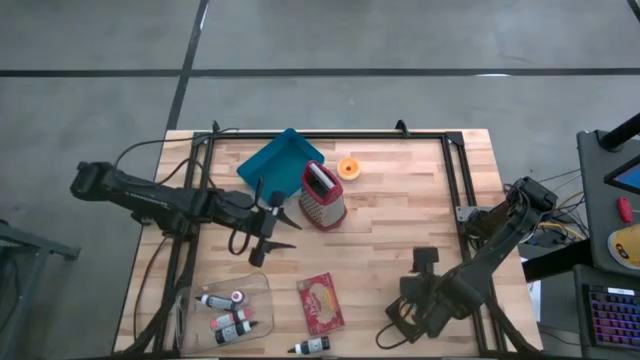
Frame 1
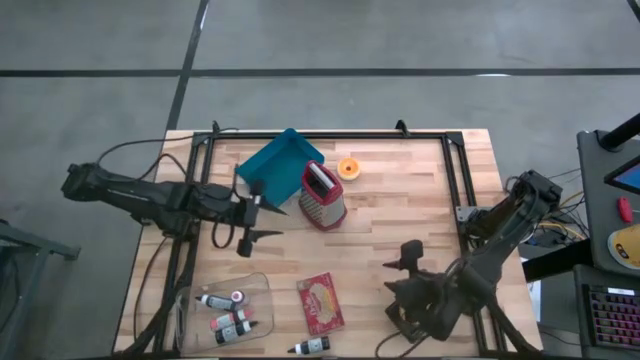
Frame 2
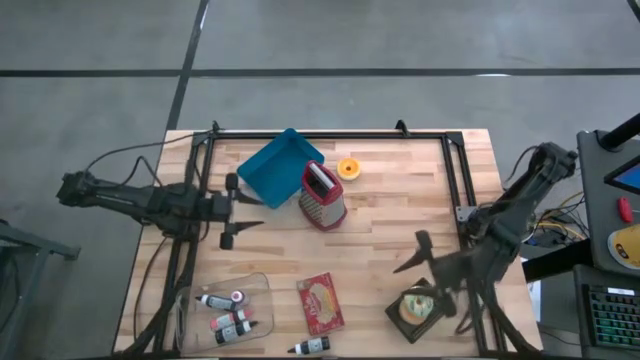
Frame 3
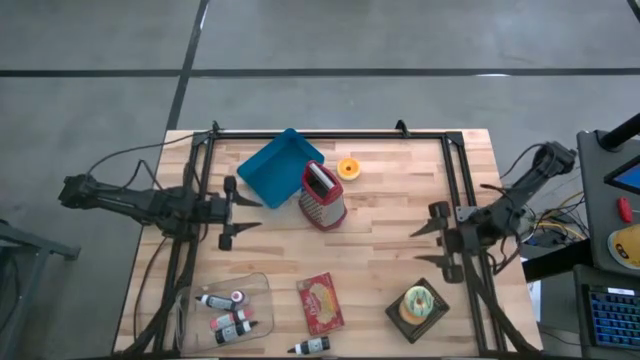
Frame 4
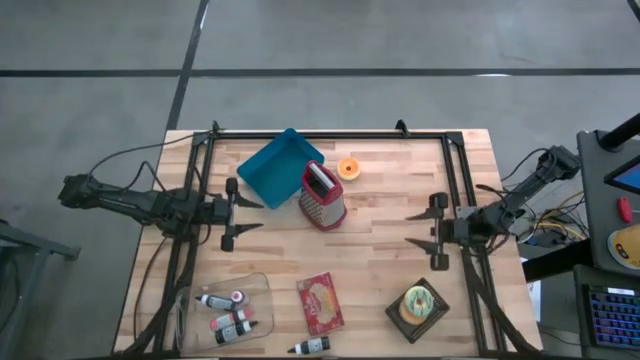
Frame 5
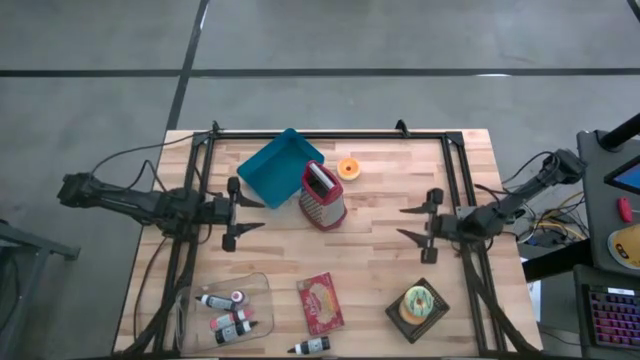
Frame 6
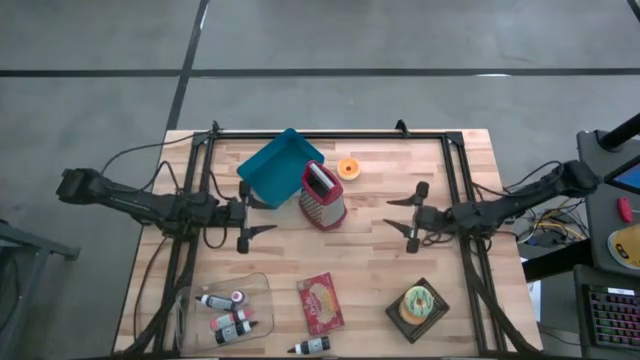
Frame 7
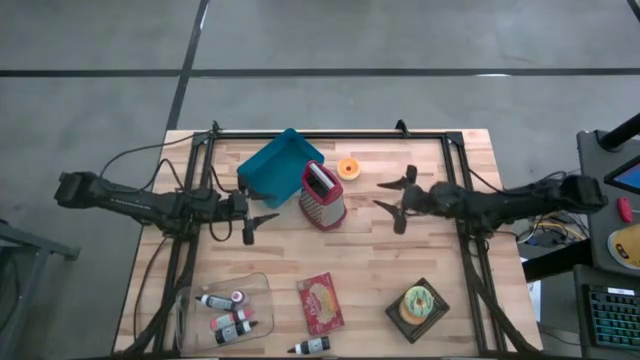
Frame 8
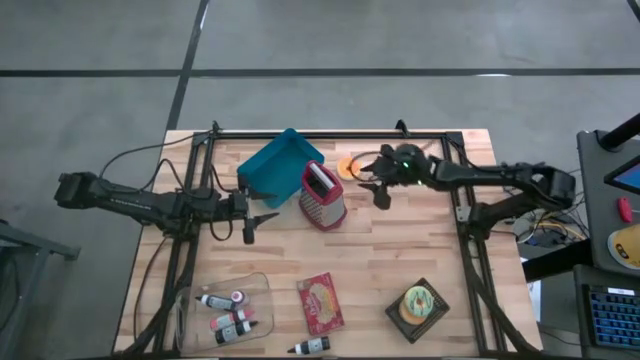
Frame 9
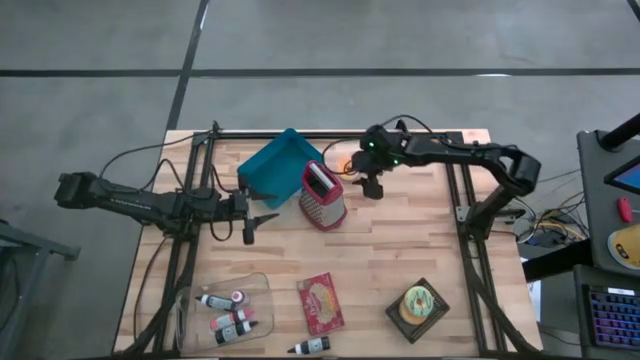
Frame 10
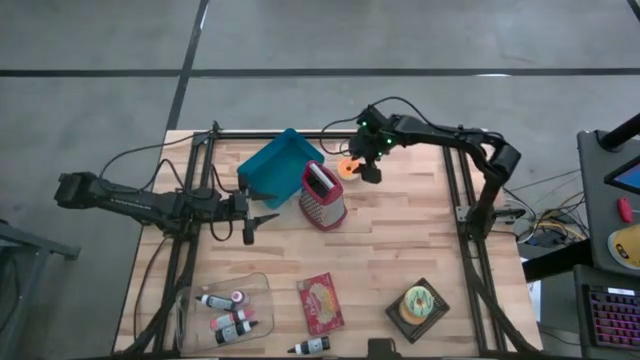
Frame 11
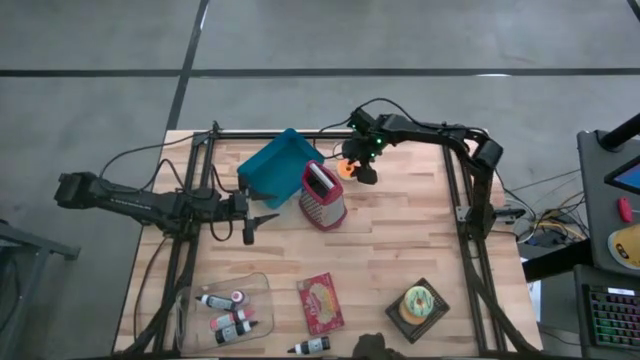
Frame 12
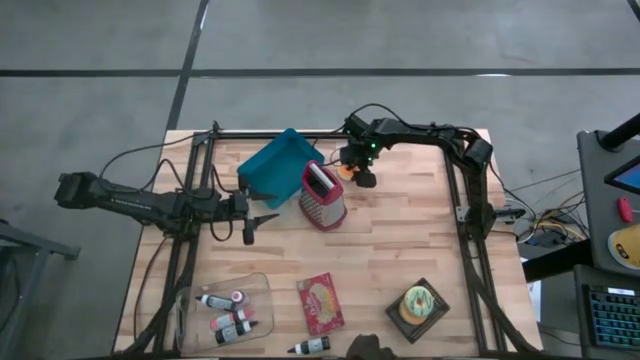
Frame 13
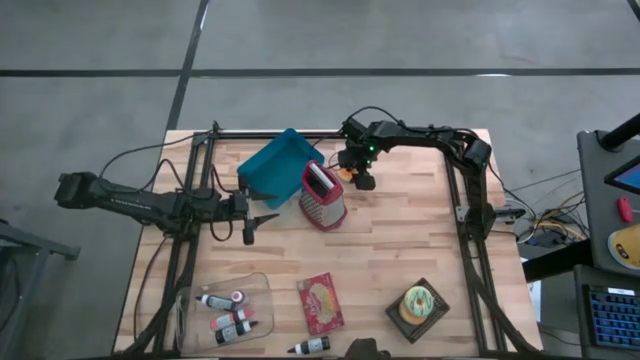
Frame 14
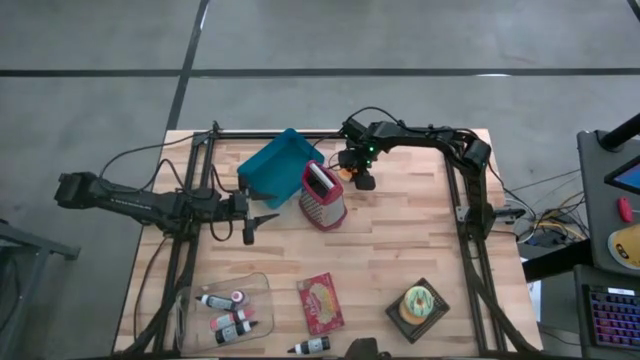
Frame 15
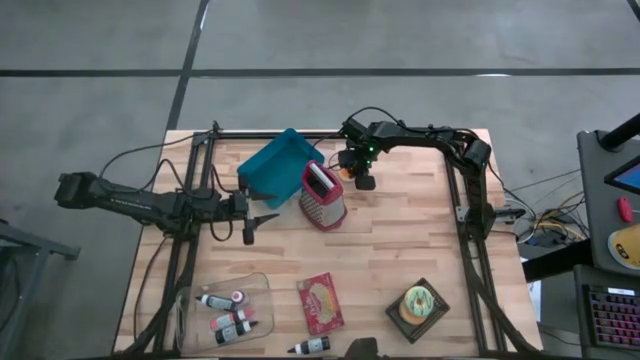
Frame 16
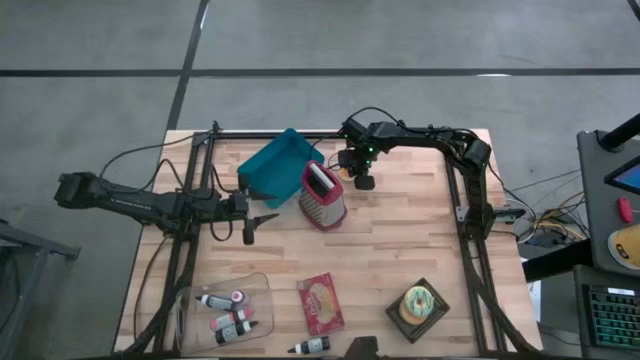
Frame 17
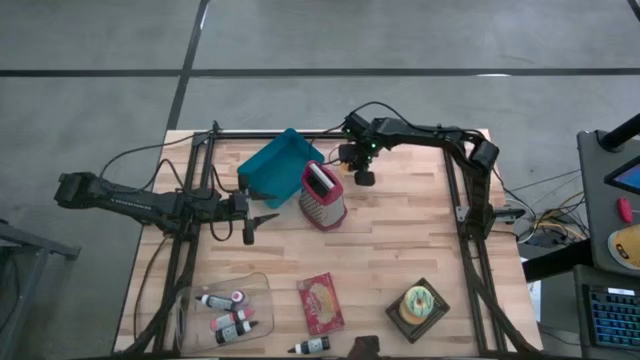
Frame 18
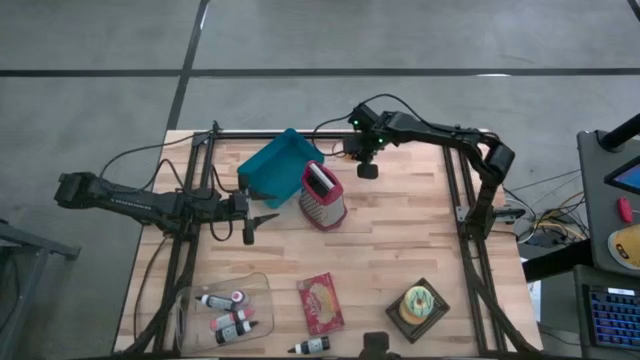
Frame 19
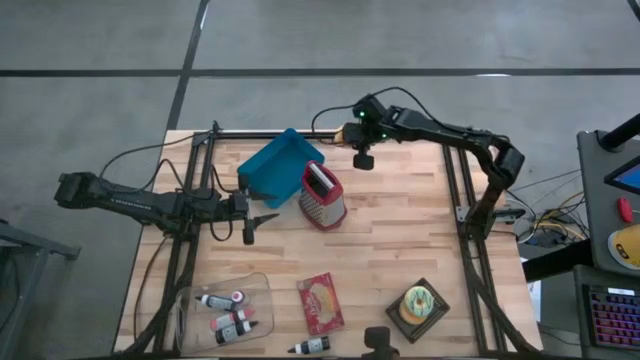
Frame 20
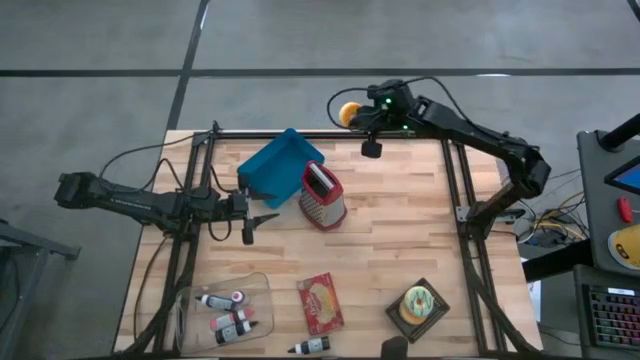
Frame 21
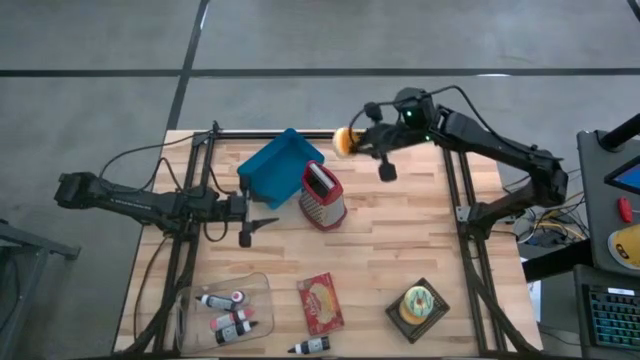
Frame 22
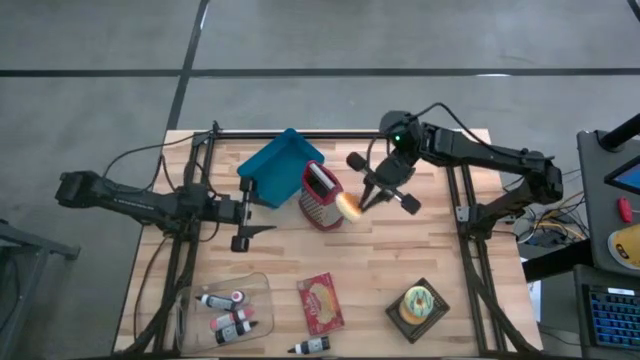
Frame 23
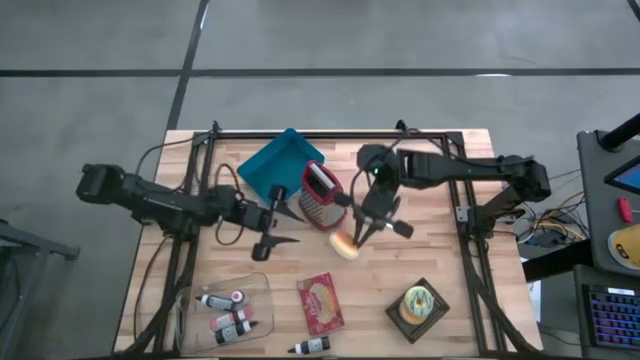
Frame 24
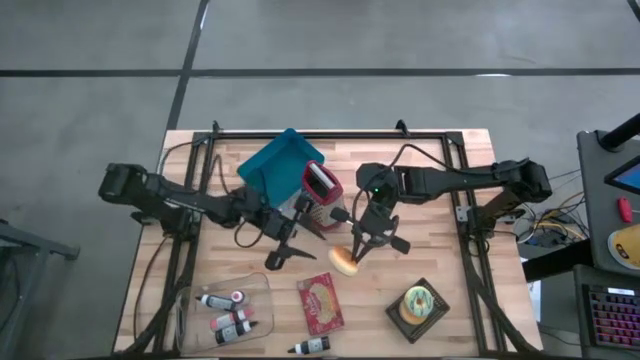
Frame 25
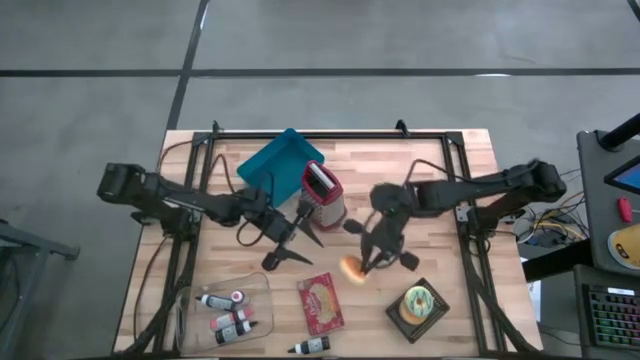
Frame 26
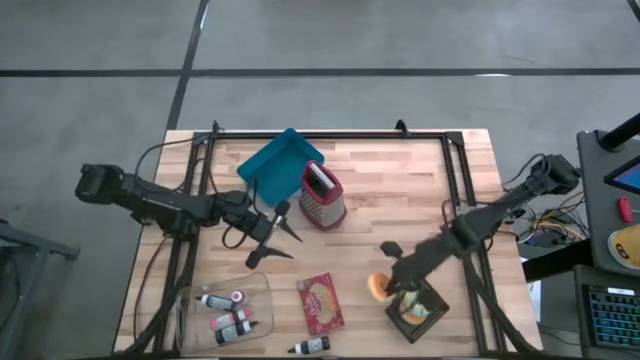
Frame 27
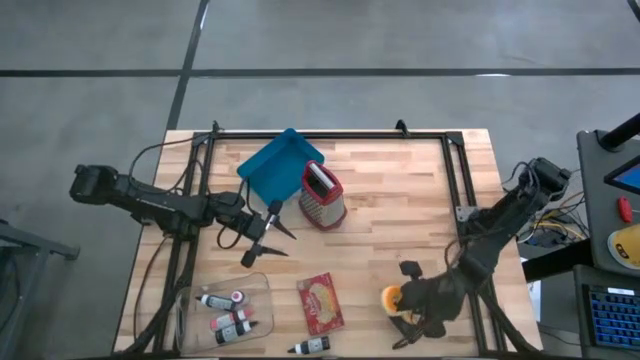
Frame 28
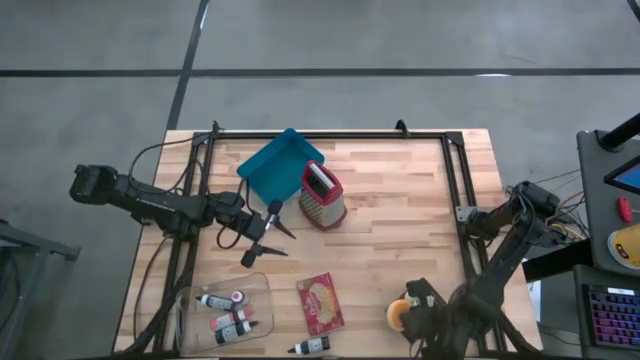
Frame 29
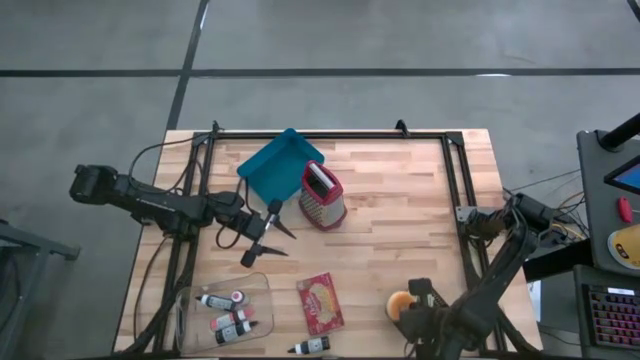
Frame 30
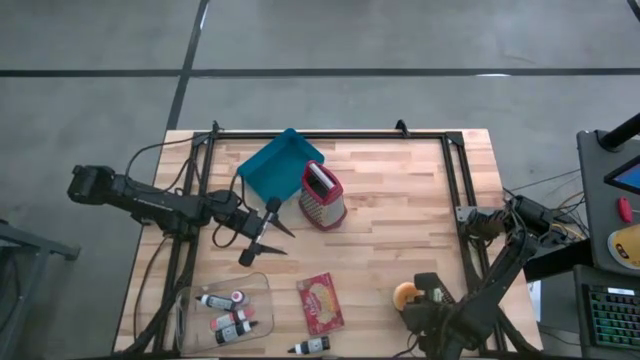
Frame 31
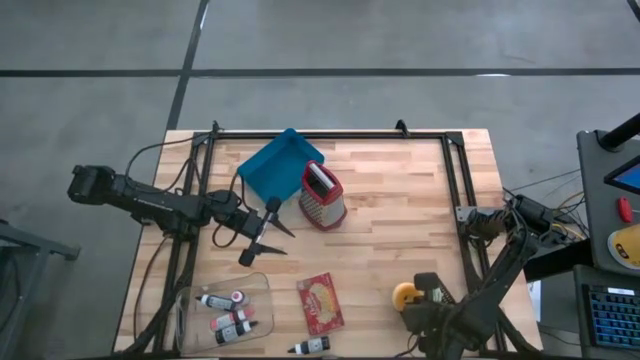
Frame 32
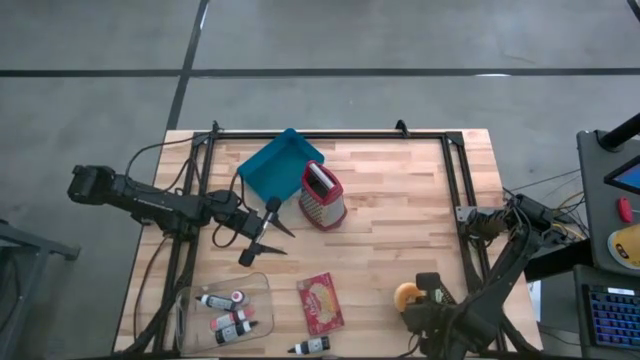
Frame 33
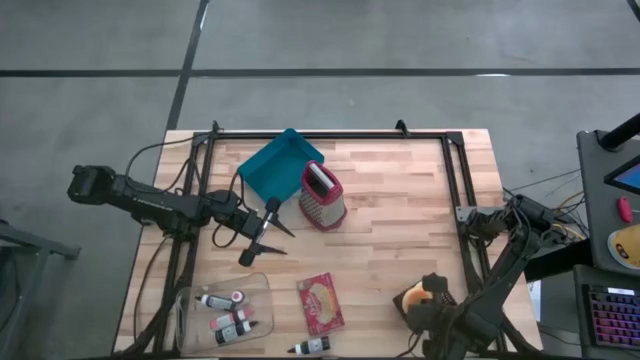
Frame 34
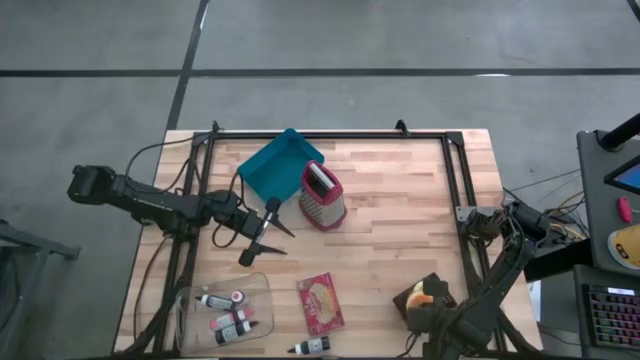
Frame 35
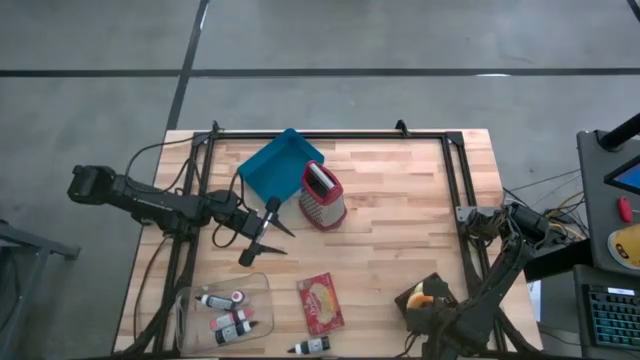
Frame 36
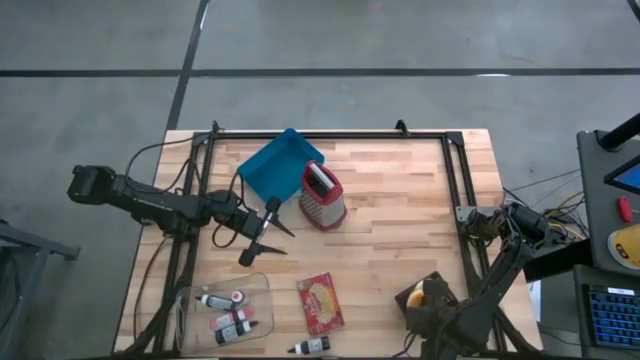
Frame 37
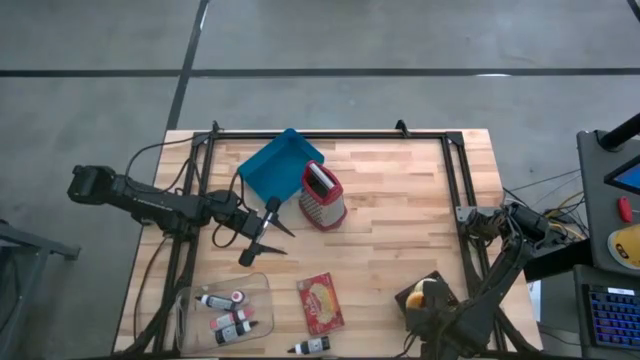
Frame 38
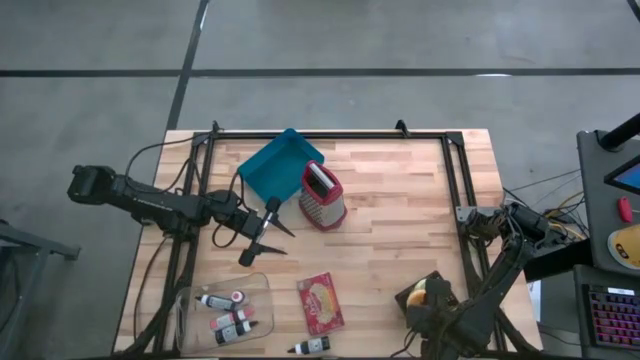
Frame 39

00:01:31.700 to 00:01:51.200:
Put the orange donut into the black bin
